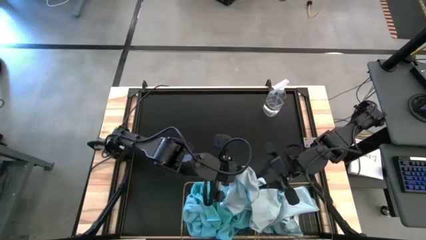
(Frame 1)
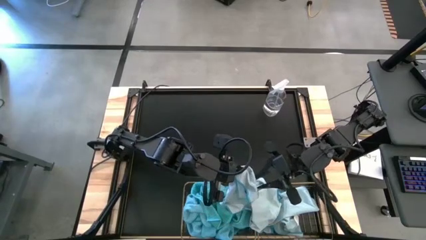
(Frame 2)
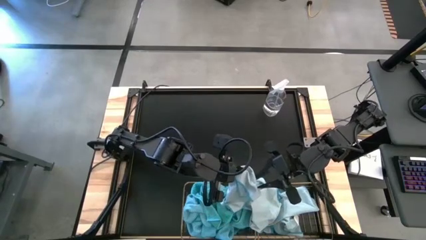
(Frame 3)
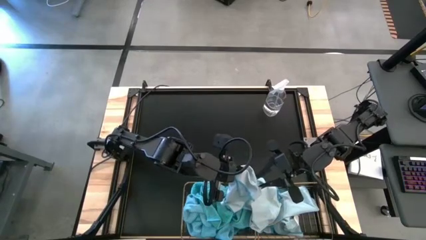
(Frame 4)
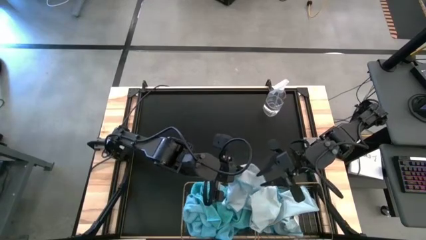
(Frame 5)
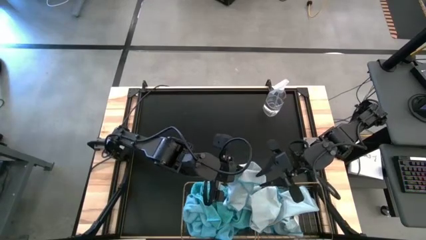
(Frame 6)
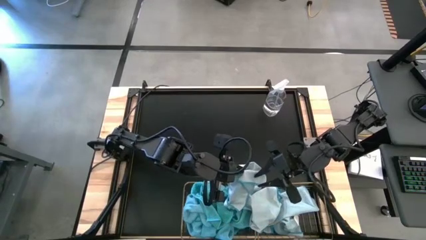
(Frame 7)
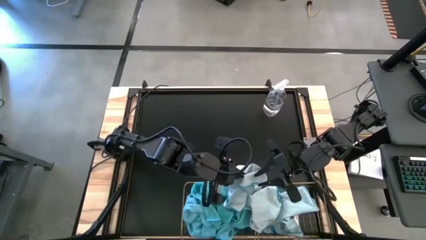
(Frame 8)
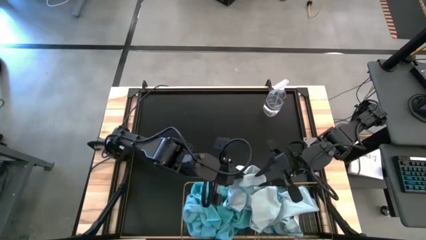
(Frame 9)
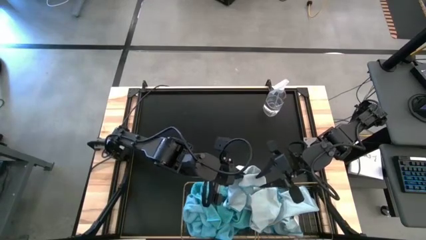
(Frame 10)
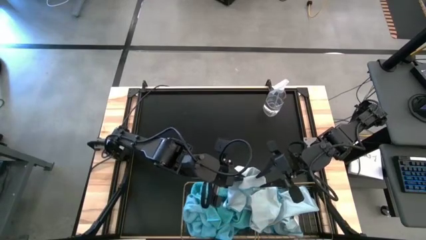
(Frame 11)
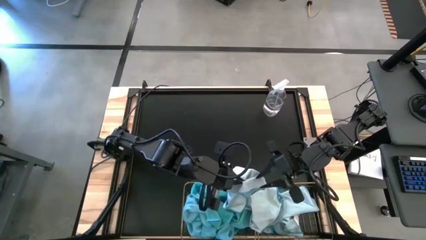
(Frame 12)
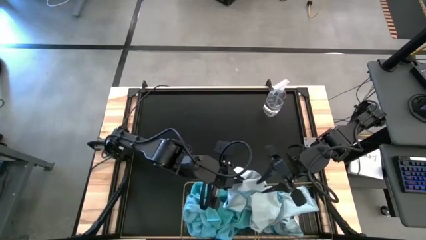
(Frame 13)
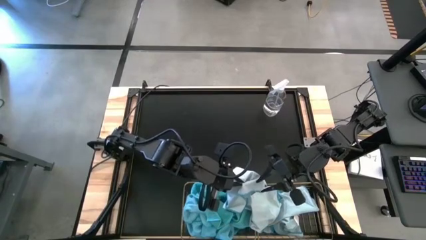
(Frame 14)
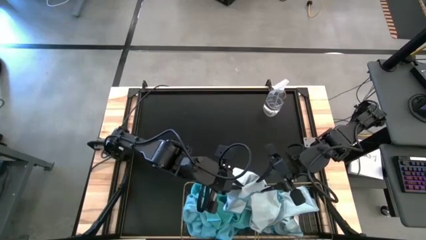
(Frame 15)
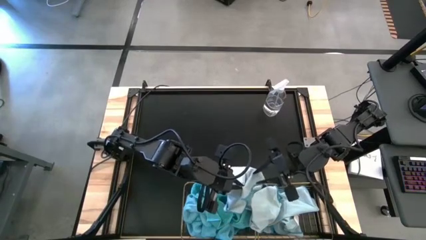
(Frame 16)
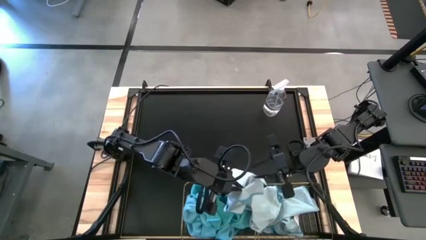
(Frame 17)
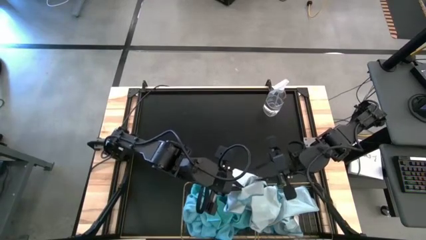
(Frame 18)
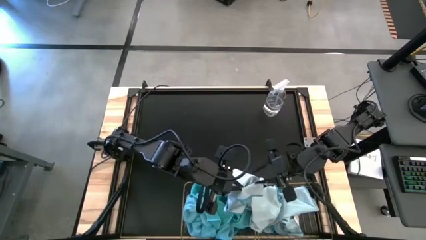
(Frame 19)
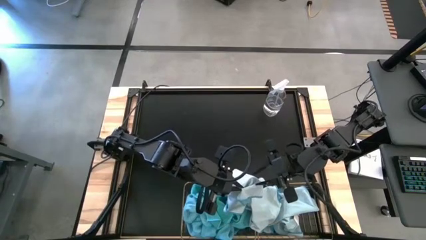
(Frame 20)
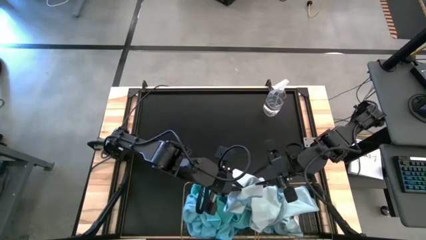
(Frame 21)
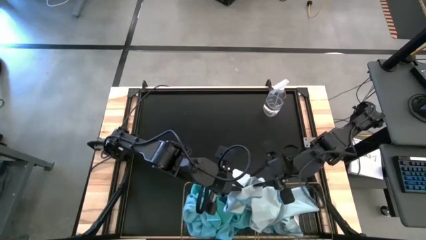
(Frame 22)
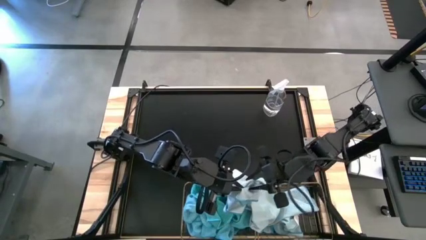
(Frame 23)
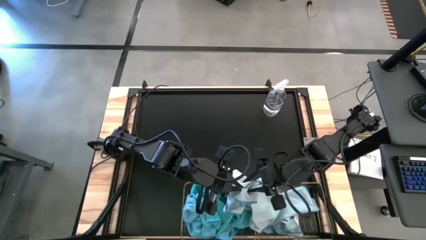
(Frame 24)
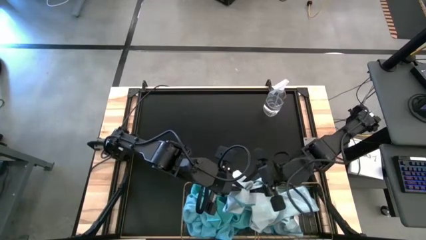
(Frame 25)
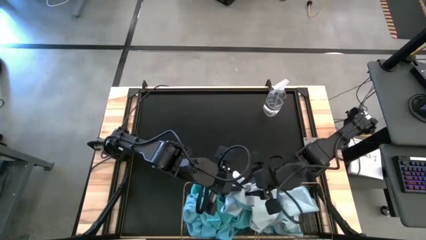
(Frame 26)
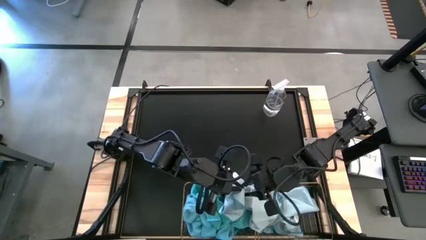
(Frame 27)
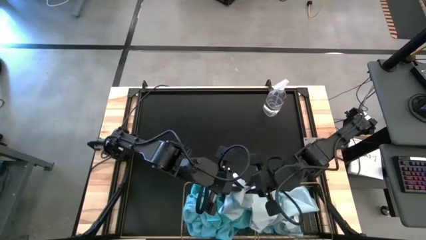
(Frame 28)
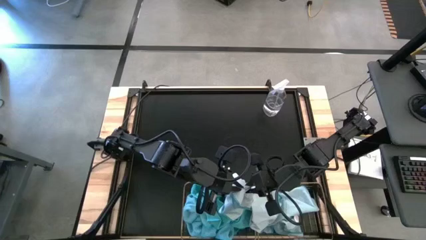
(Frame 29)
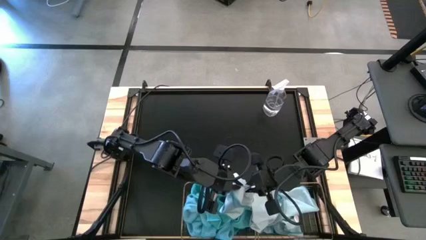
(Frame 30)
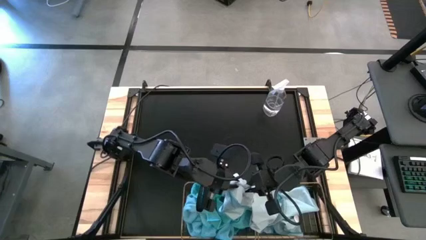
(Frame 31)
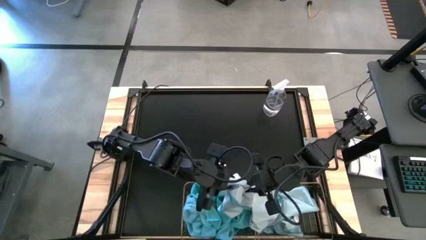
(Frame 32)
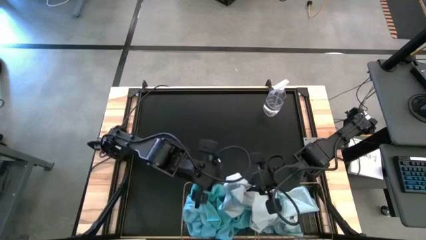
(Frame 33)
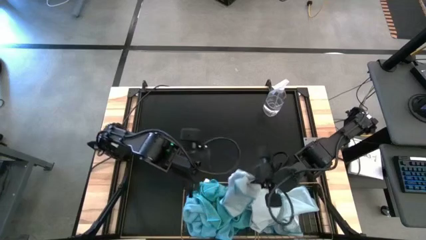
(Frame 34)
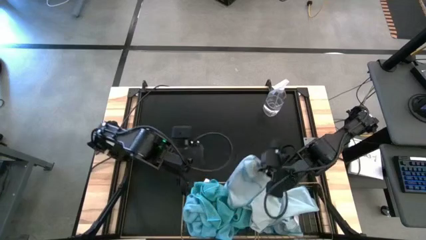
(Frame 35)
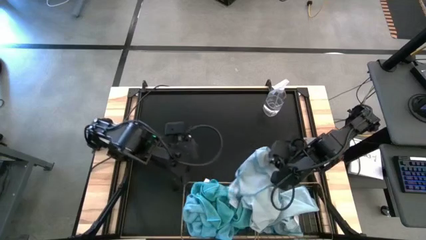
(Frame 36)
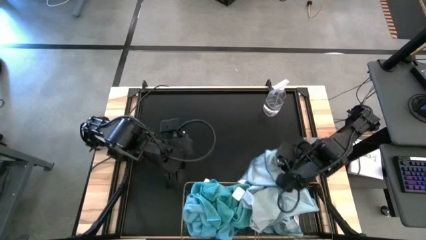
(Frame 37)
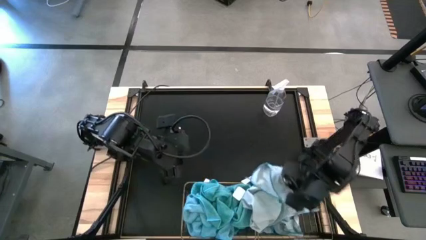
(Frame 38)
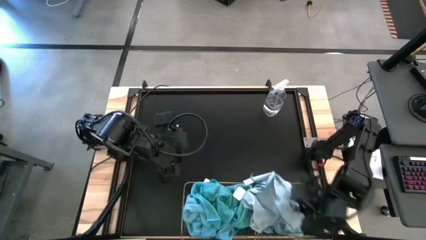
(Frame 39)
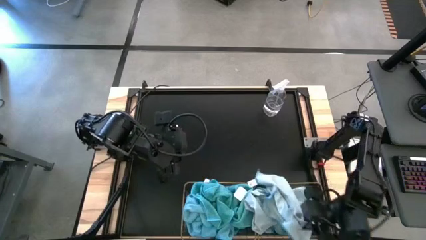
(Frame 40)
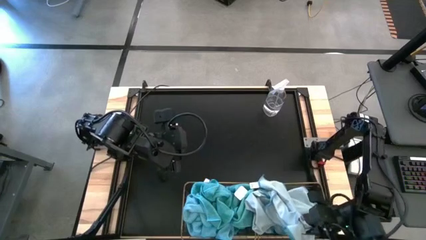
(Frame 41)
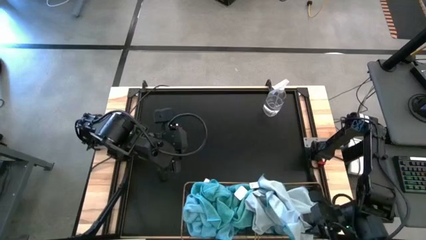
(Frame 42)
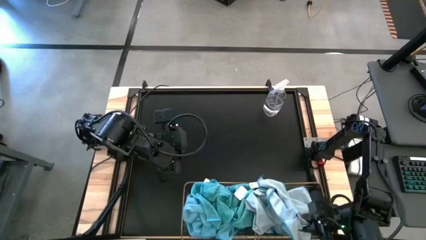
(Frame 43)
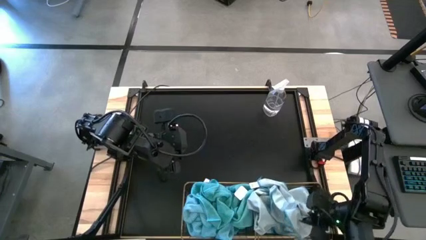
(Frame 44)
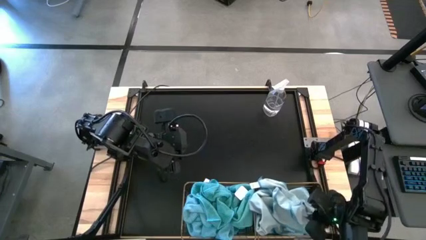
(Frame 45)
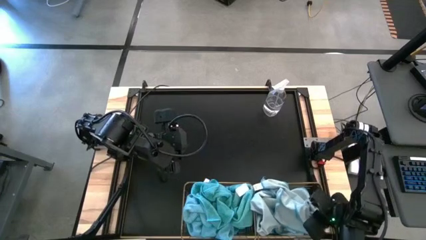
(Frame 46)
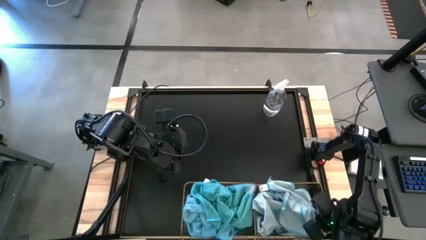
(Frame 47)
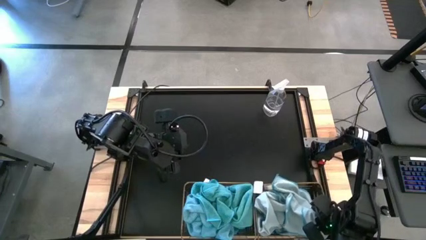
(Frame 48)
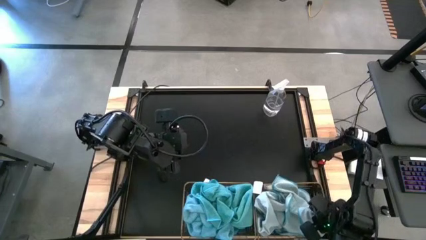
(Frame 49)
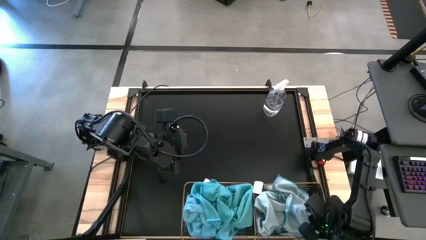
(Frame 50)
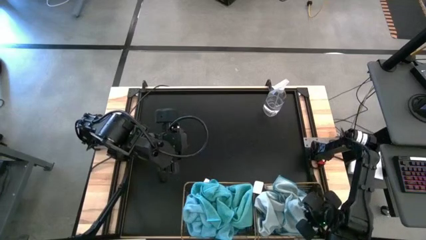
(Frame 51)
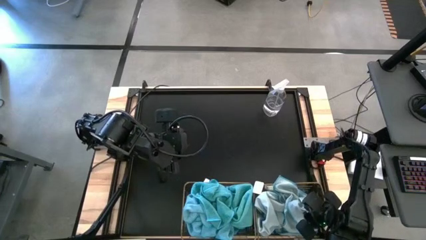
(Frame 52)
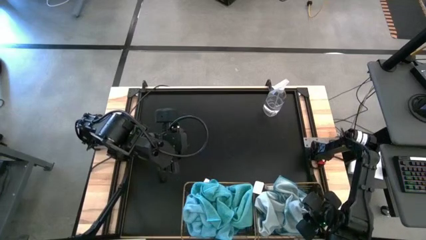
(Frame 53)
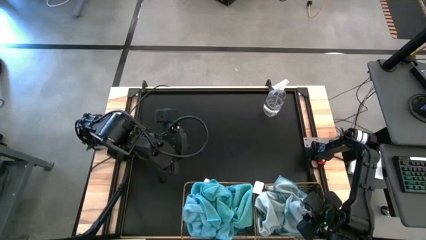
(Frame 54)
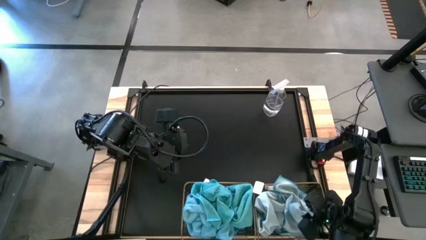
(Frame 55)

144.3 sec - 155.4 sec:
Task: Sort microfiber towel by color & place in baskets
Put the light blue towel into the right wire basket
